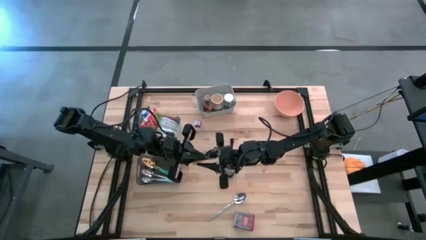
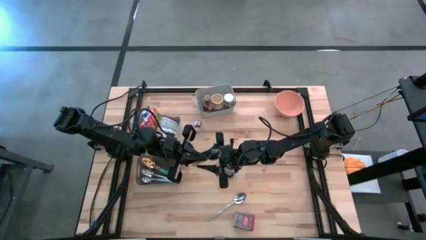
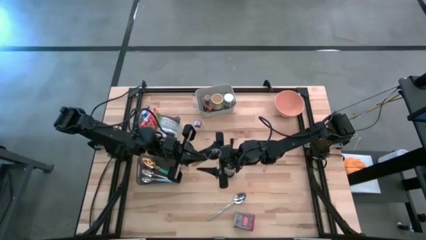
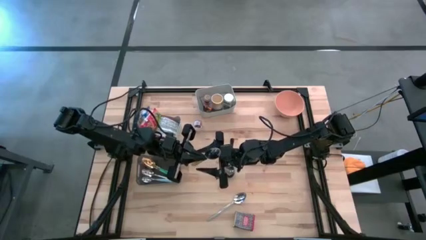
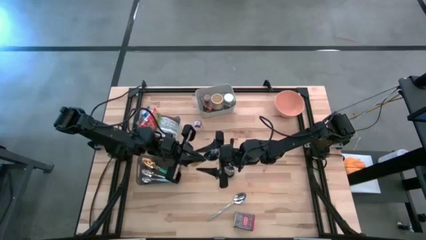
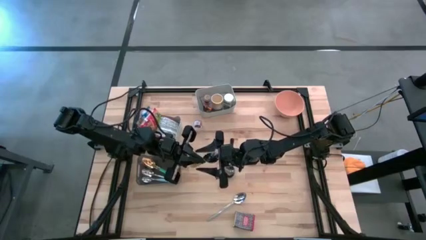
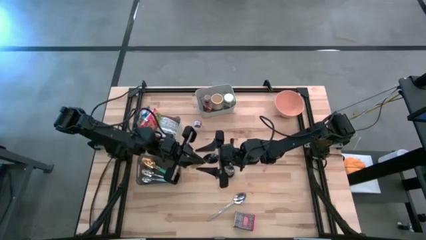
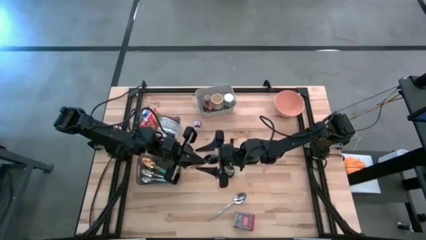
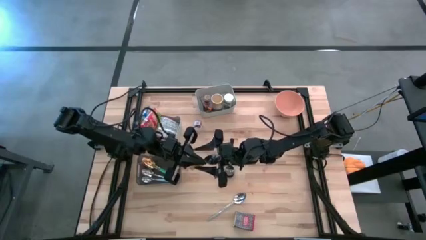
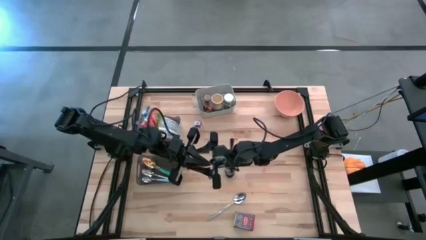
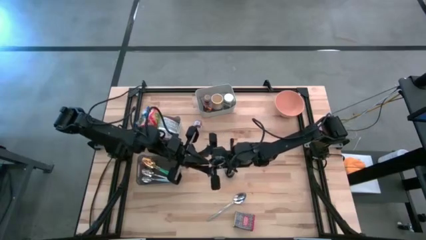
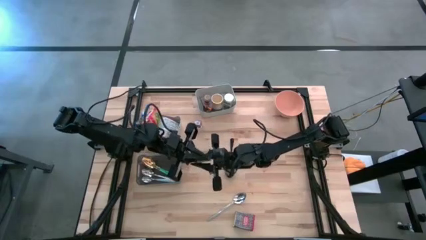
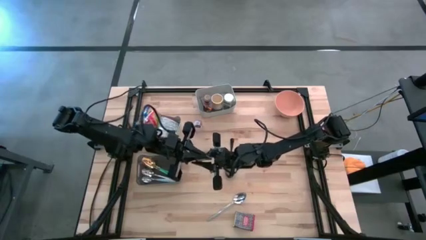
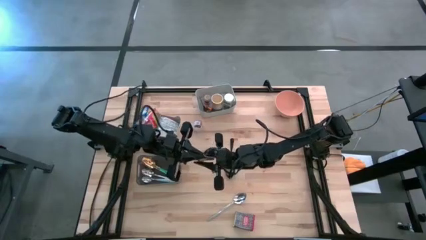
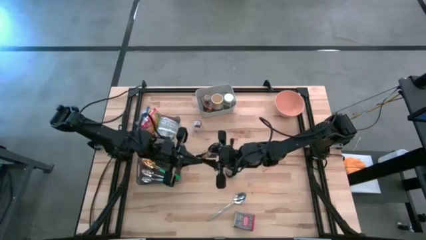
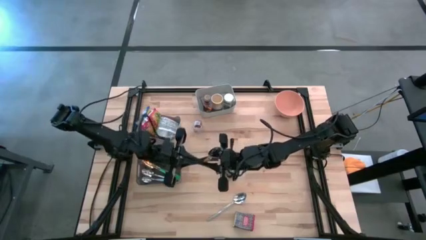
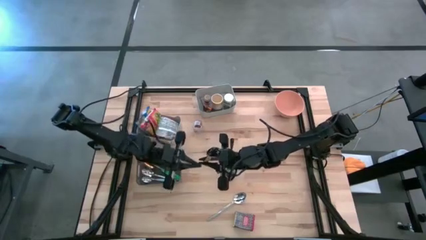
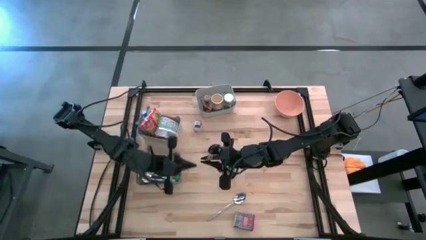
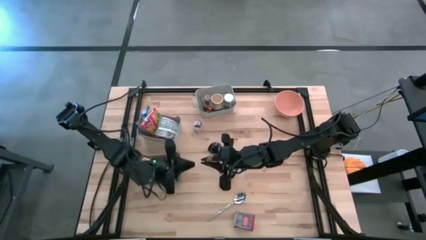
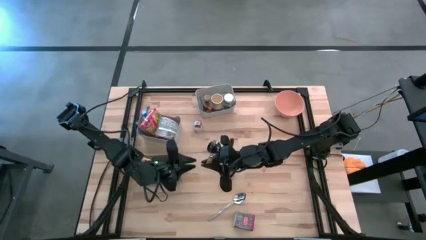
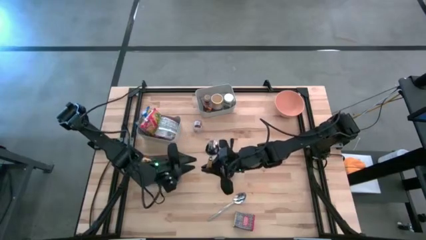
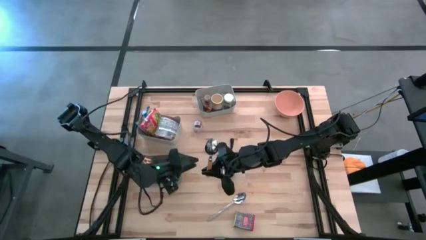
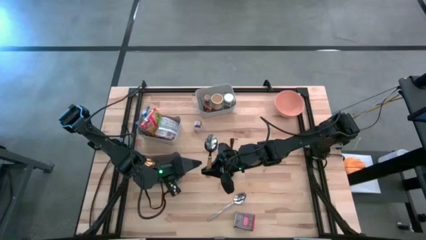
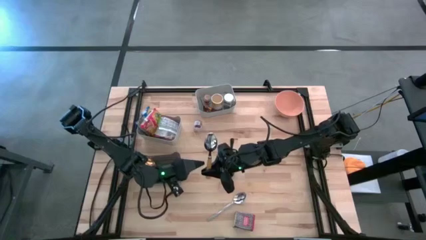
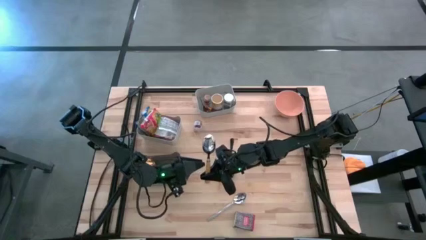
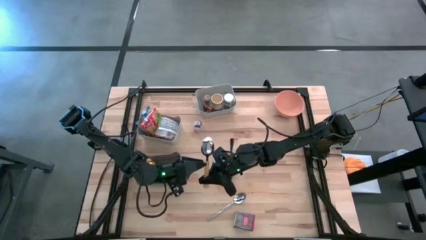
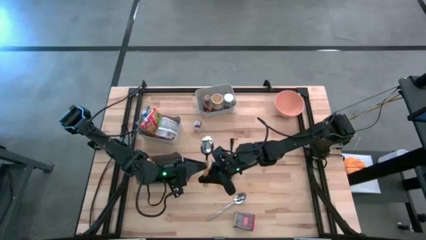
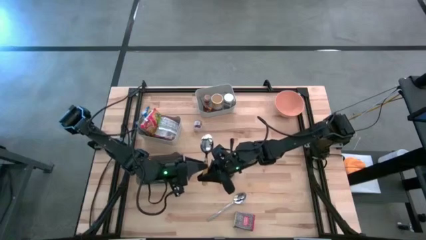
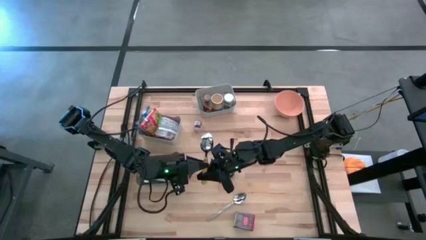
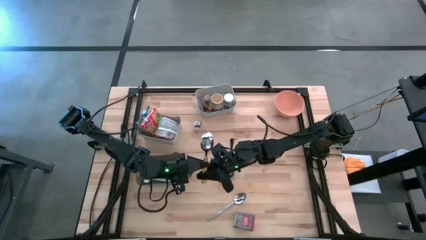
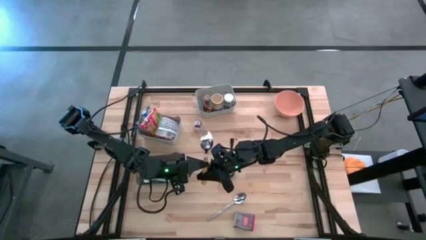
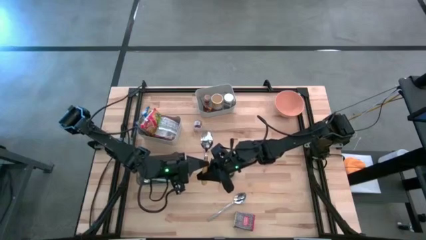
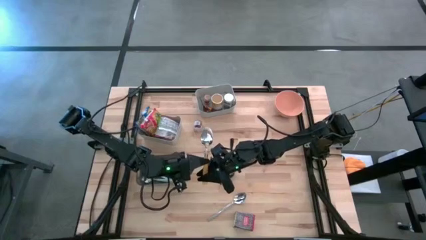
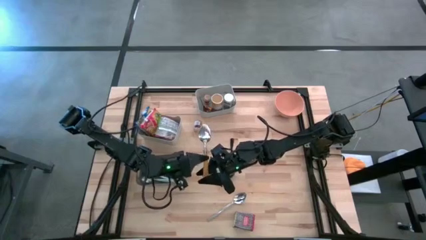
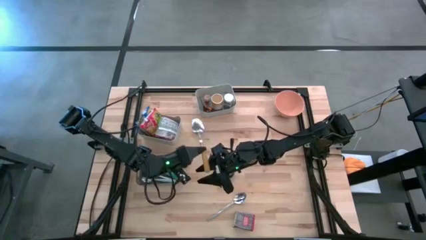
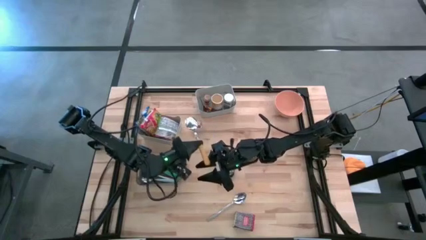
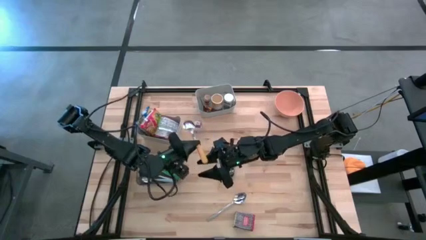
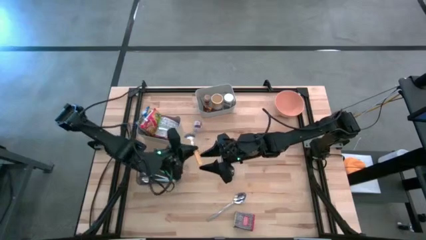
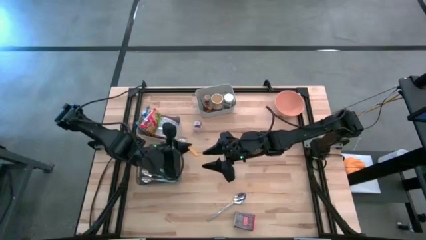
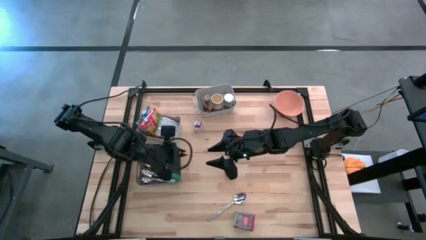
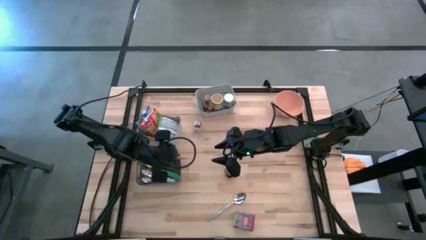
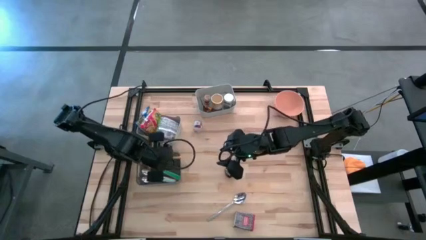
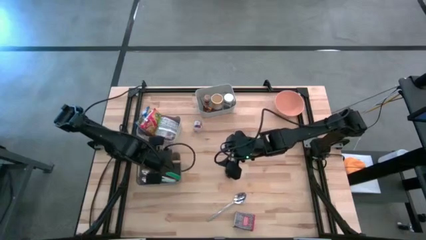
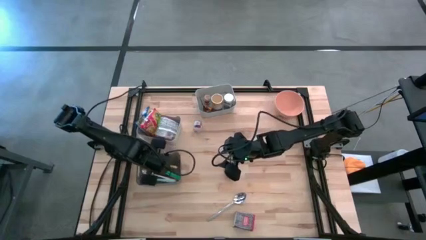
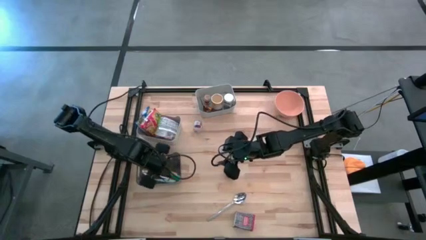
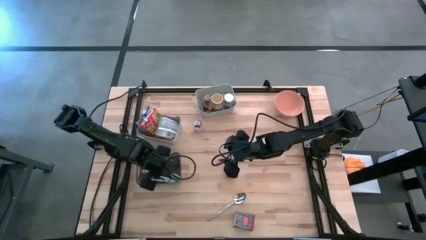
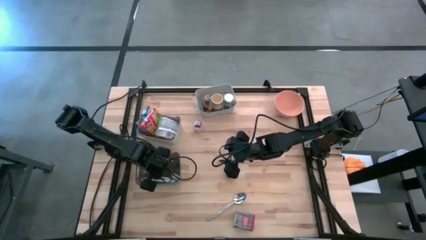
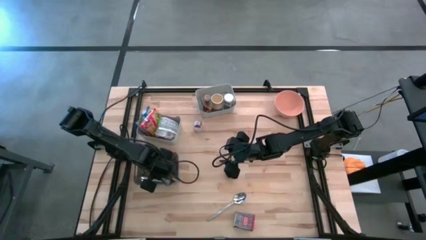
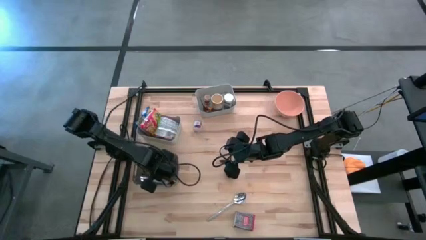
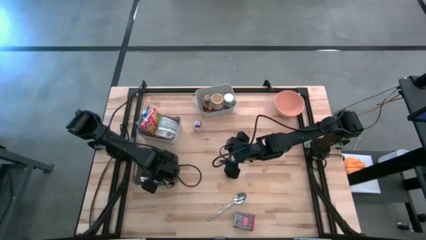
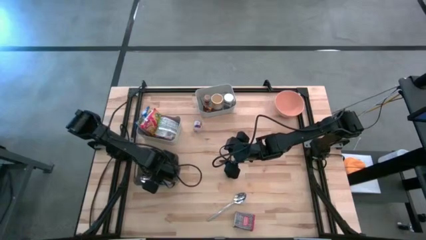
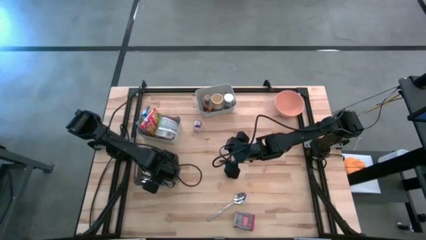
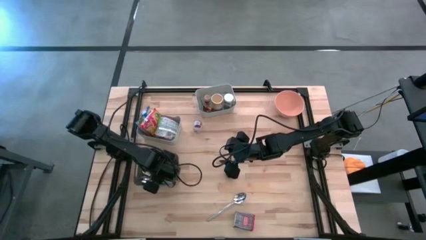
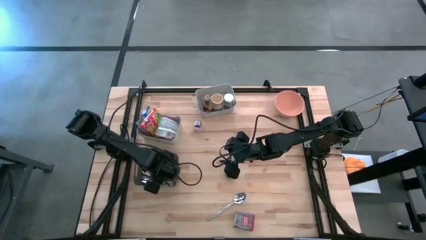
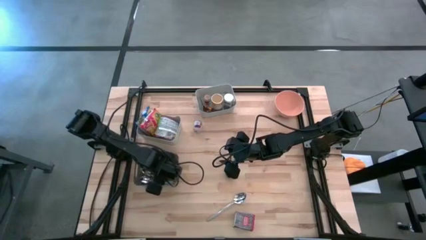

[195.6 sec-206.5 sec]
Put the yellow spoon into the black bin
